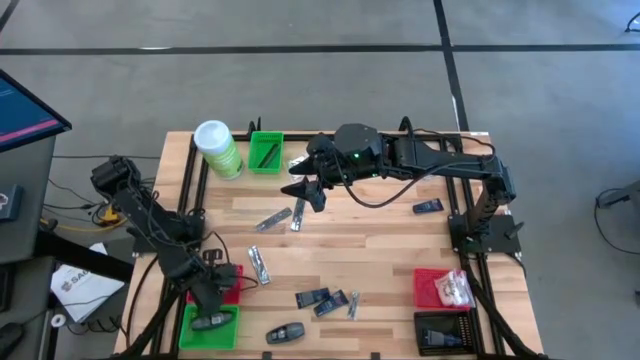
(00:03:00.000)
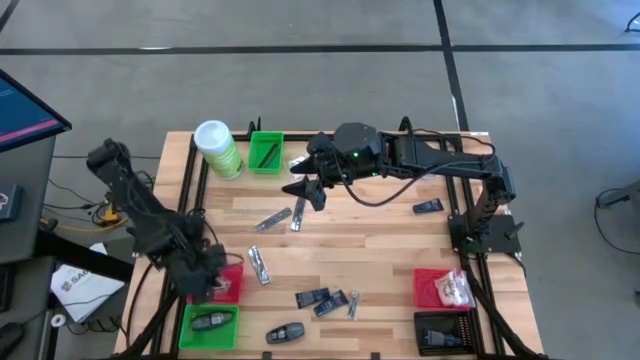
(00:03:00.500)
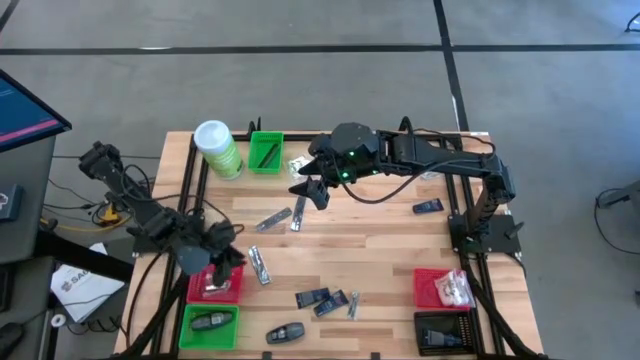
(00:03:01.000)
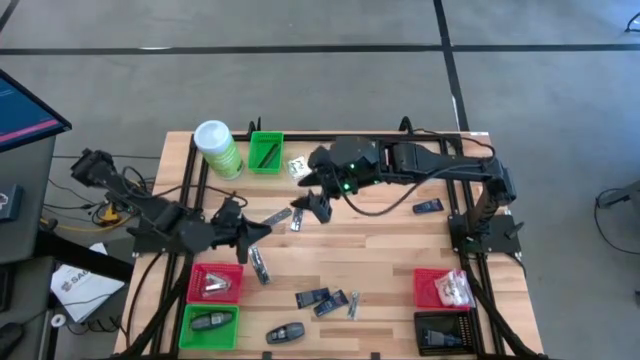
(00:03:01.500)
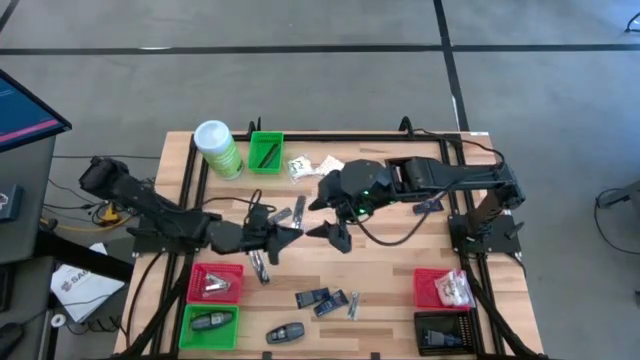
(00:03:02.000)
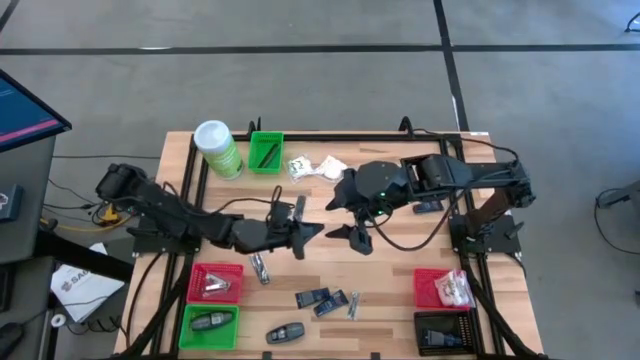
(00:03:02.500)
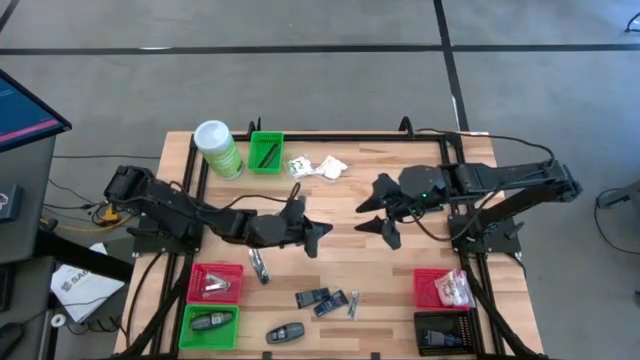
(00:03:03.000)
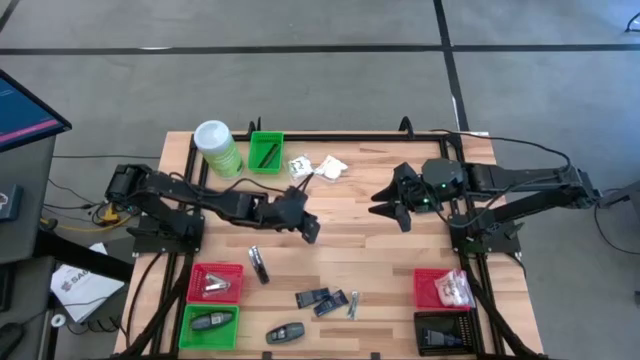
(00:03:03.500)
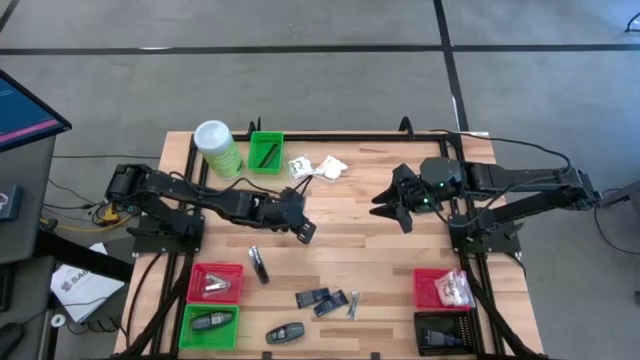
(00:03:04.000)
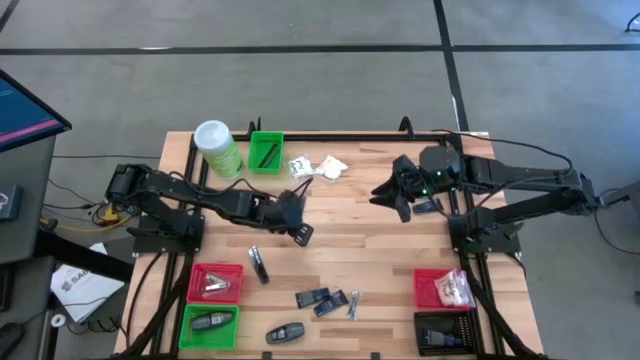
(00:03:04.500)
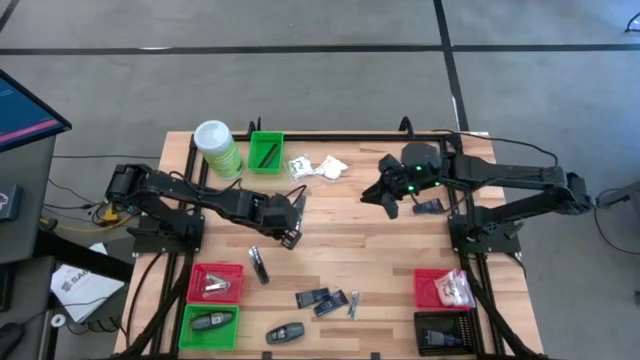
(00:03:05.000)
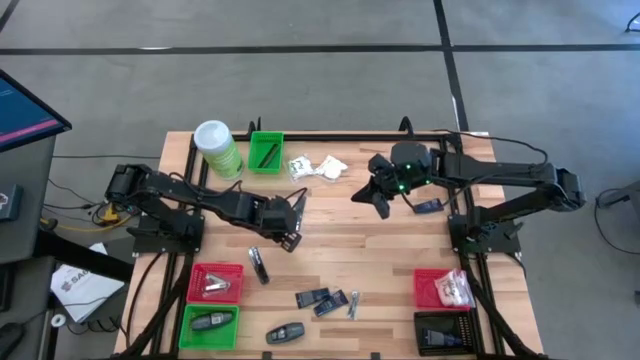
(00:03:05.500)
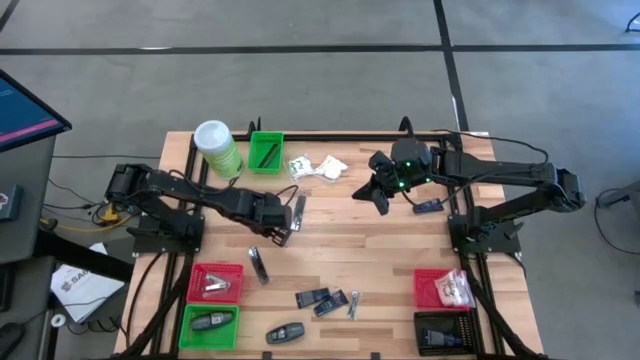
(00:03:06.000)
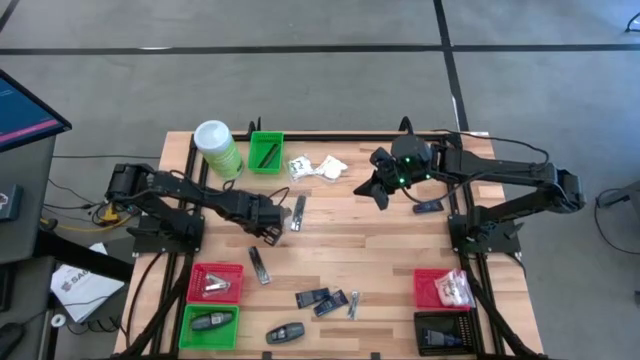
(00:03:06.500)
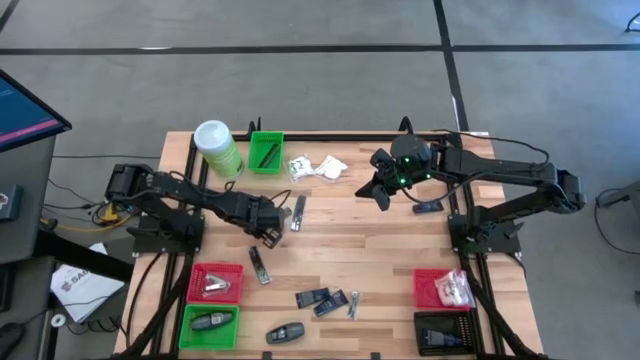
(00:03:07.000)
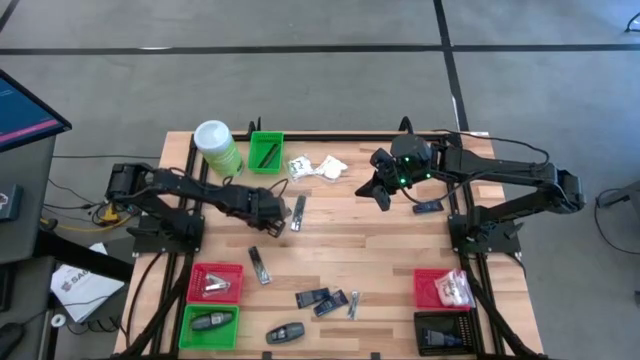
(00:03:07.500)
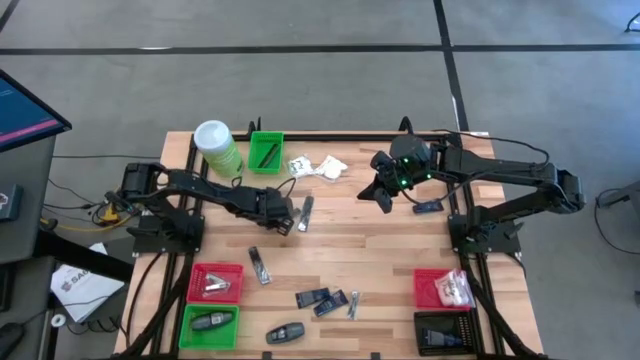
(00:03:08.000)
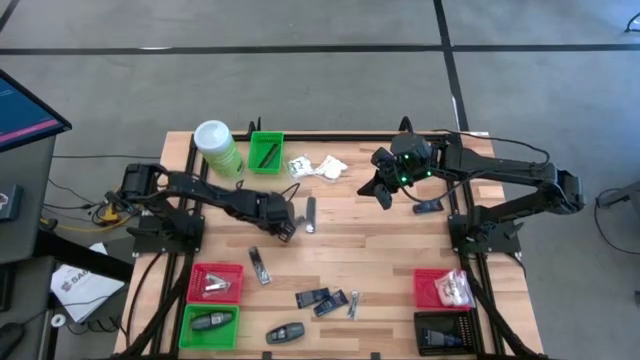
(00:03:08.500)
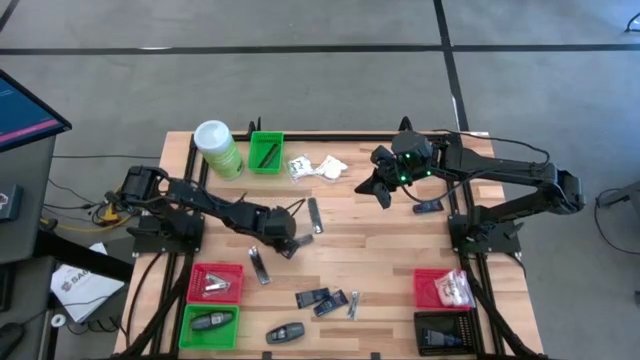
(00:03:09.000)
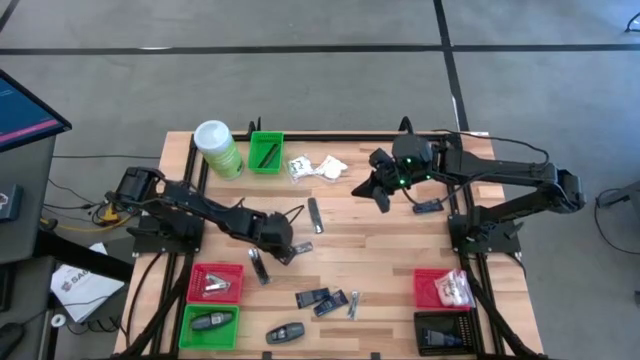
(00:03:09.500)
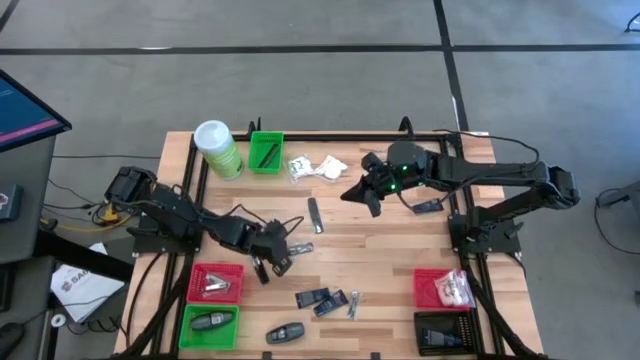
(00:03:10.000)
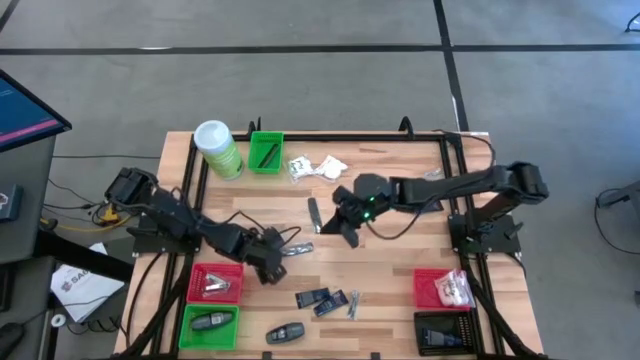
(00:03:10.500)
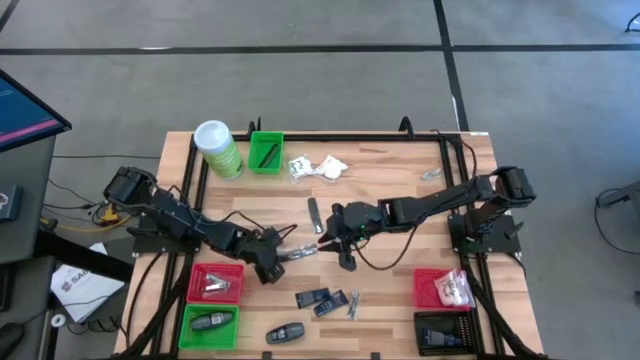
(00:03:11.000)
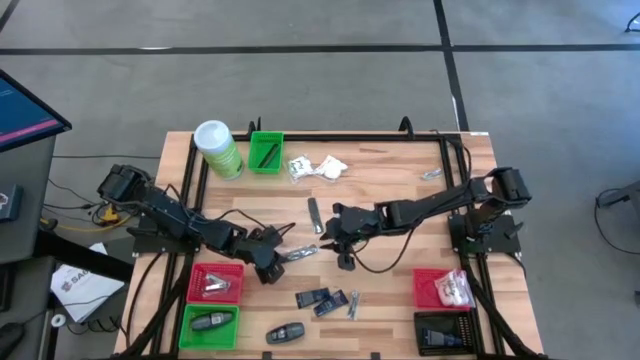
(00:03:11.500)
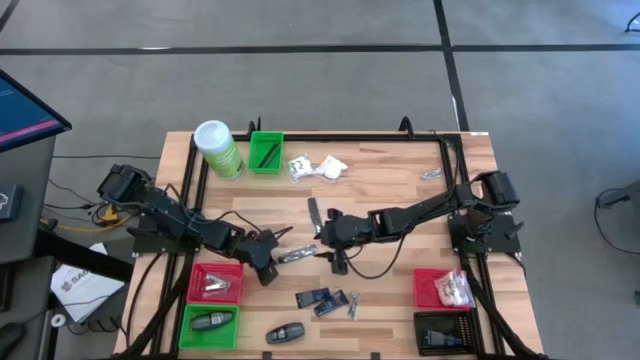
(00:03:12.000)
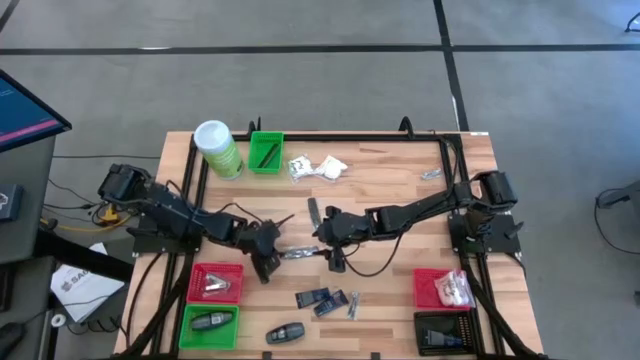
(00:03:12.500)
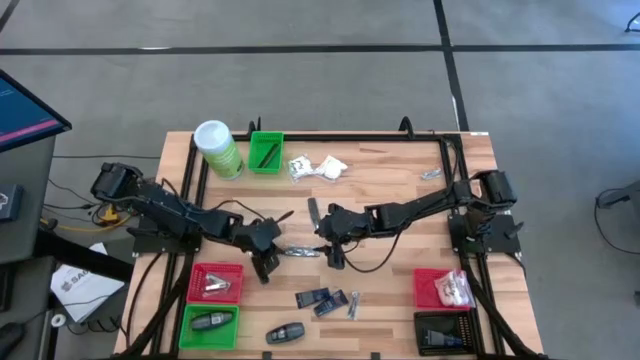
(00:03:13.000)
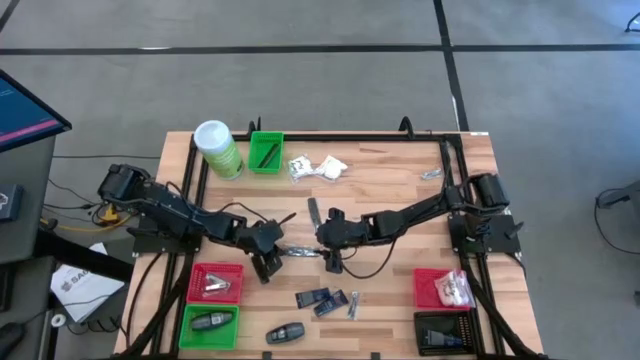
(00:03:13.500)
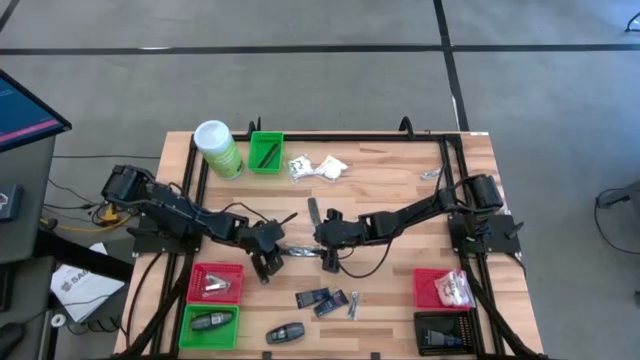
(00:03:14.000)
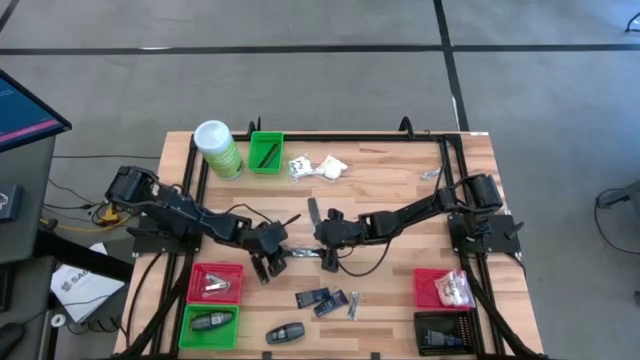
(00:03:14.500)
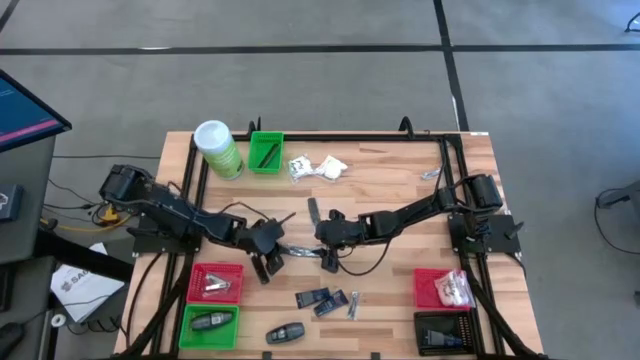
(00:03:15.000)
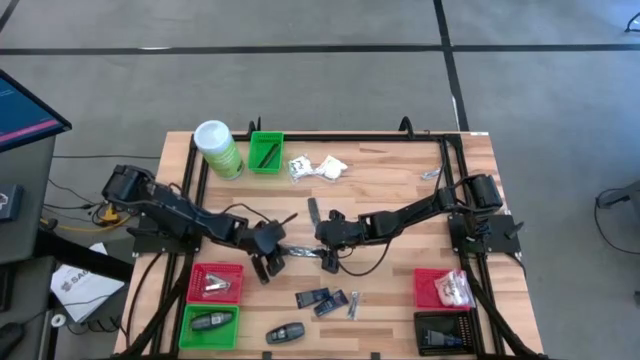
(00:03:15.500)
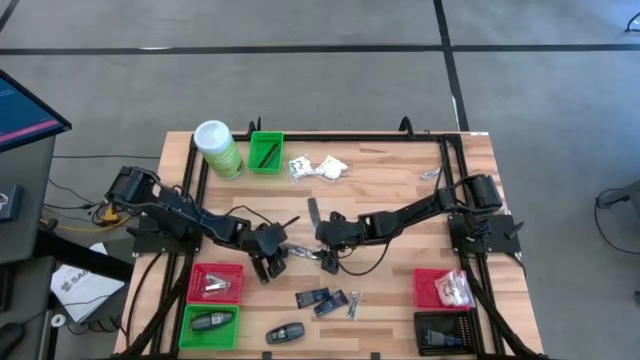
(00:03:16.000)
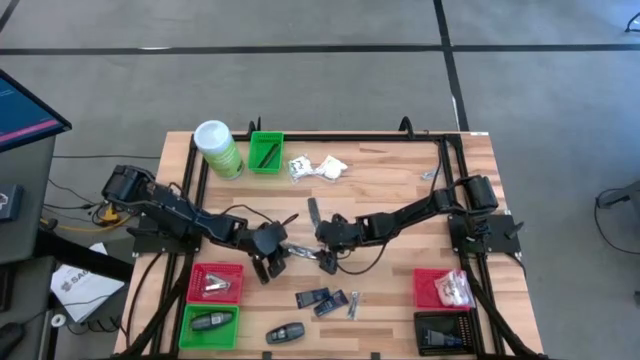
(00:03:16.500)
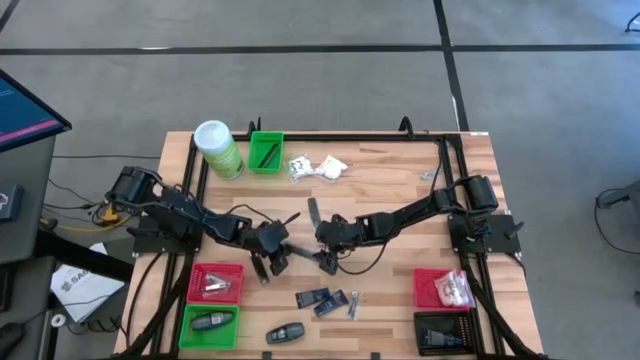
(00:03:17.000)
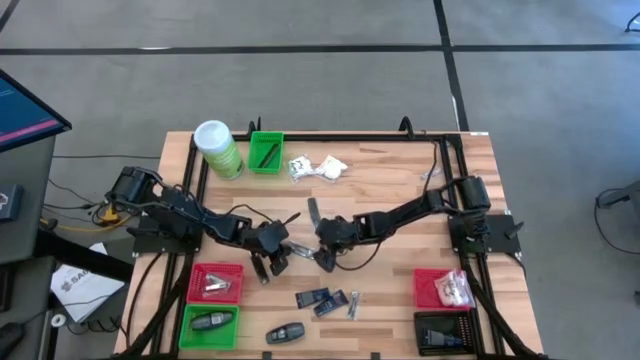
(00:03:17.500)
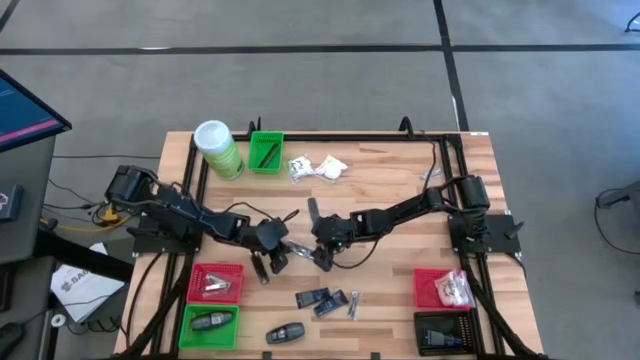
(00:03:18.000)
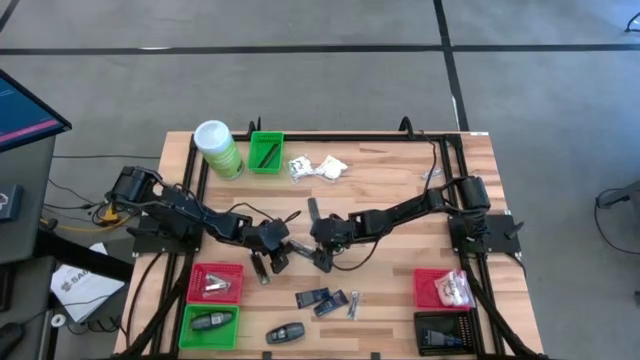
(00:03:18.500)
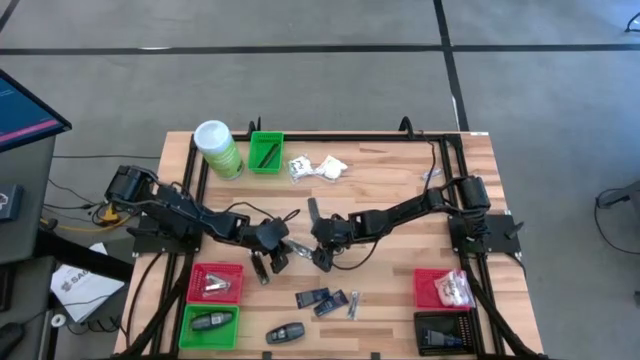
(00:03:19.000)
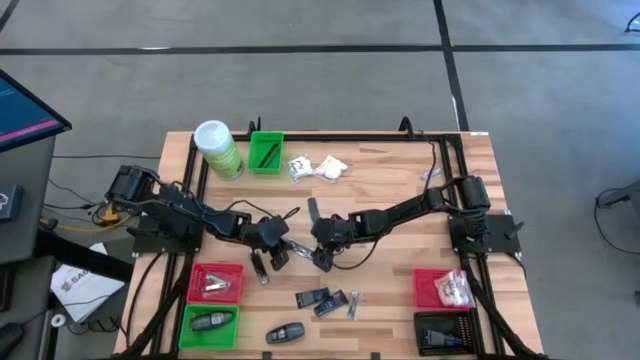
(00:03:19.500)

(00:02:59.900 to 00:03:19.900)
Task: Pick & Place Travel size toiletries
Put the black comb into the top green bin
